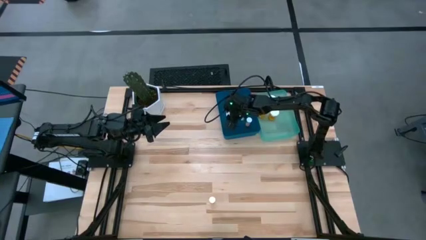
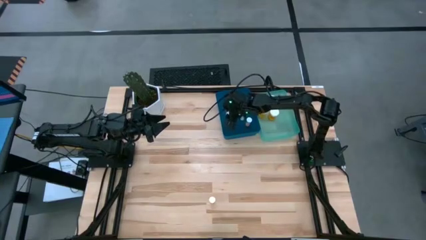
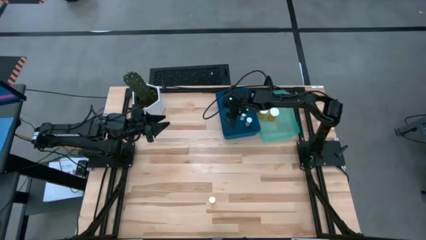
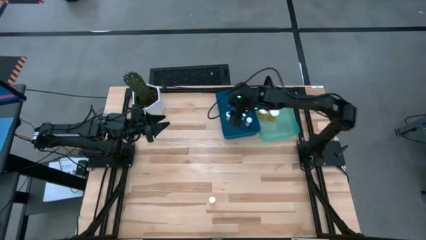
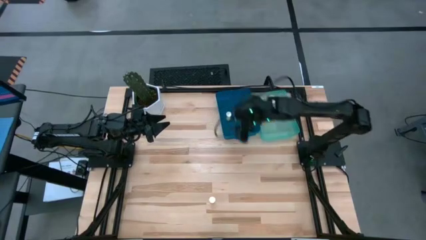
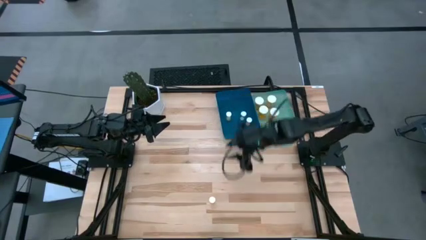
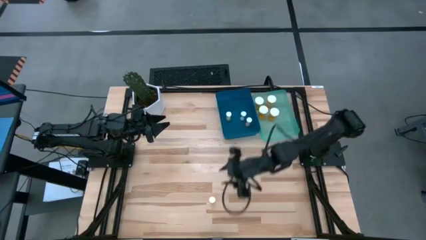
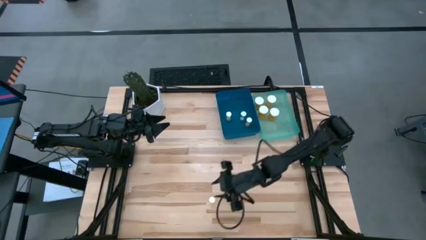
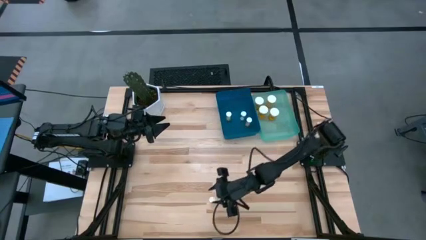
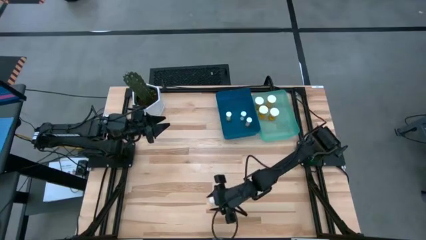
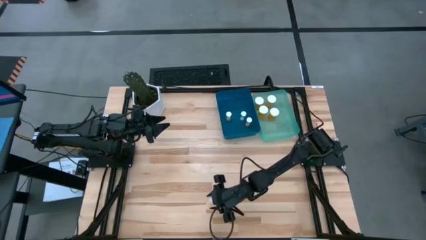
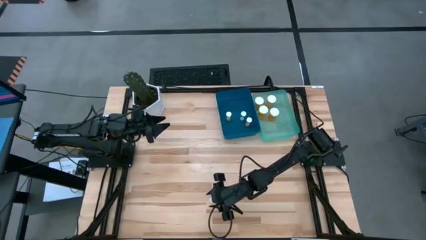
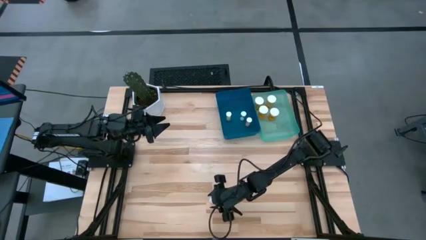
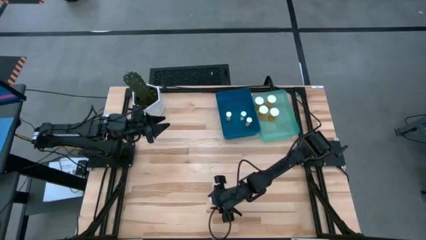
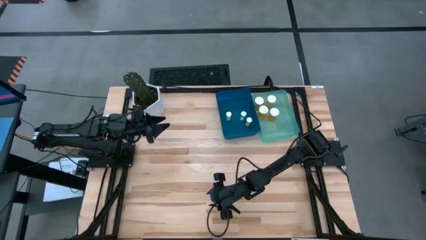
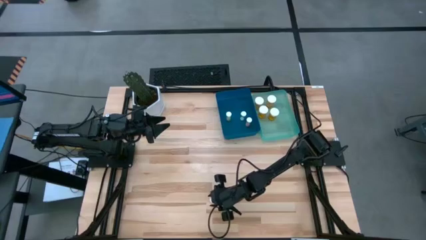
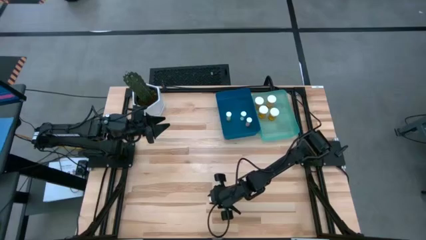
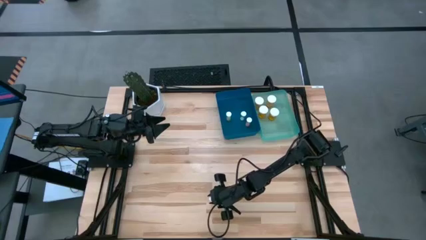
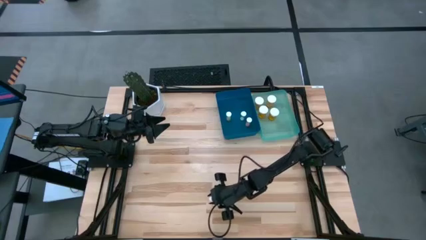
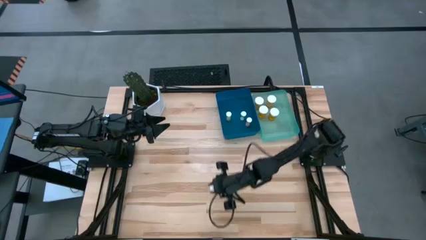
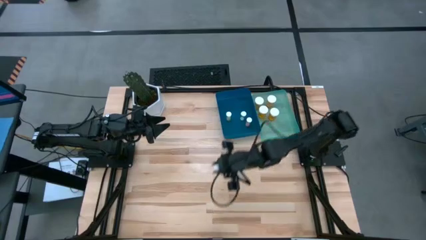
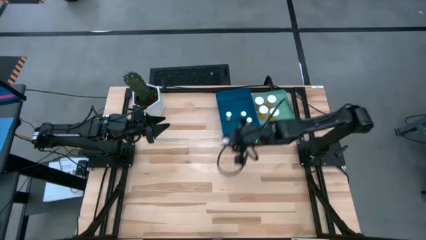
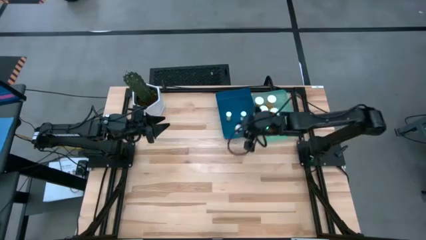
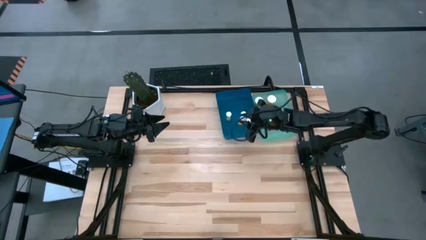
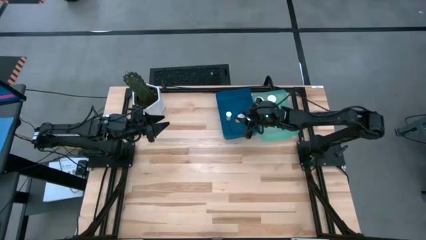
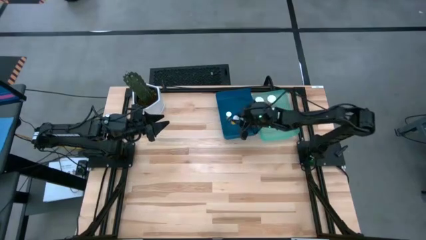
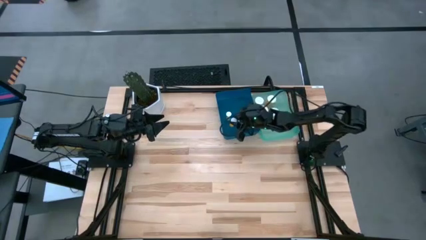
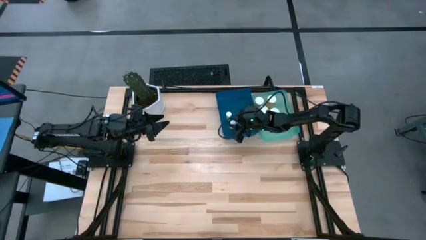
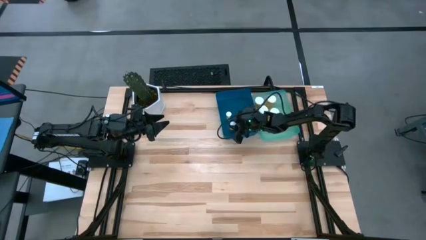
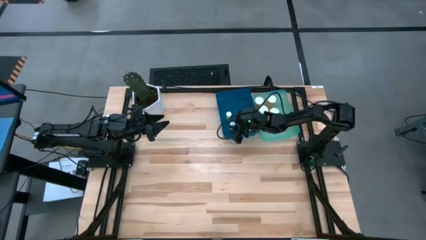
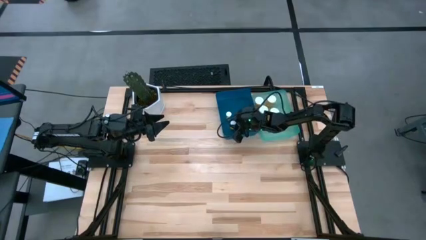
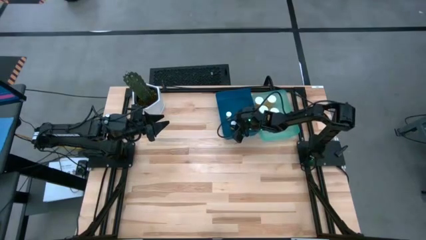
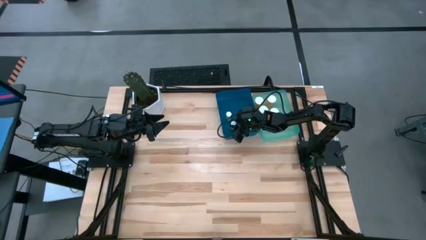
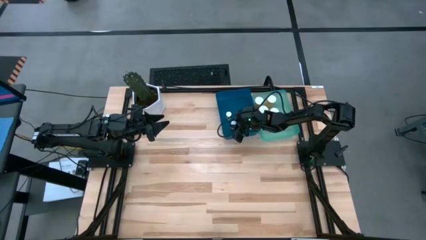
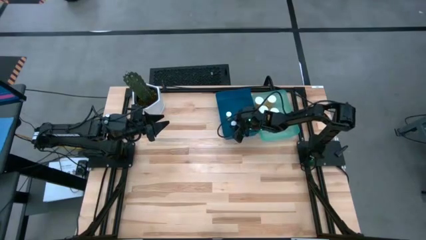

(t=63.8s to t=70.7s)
Task: Pick and place medicine bottles into bin by pill shape (circle, oval)
Put the orange tablet bottle into the dark blue bin

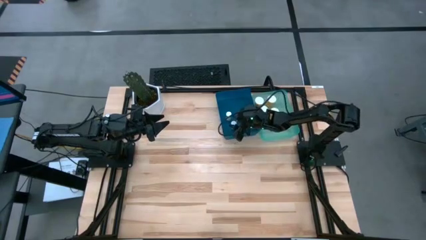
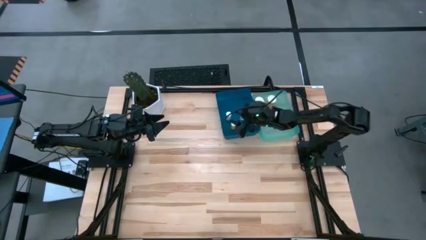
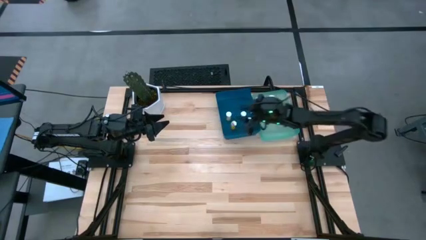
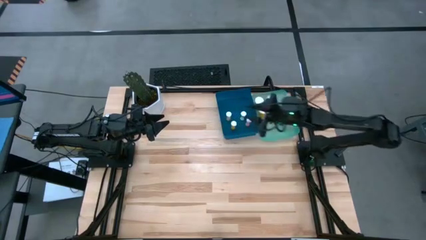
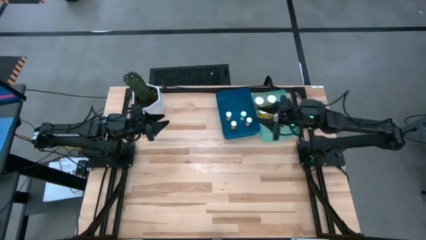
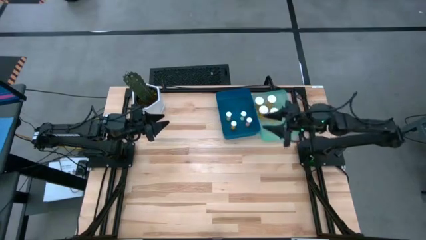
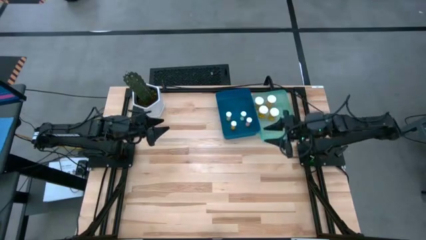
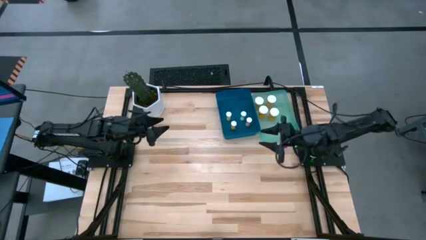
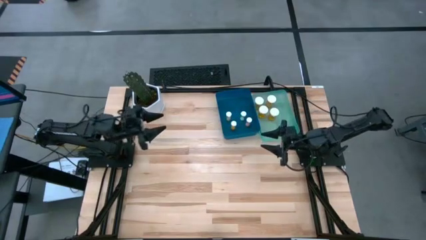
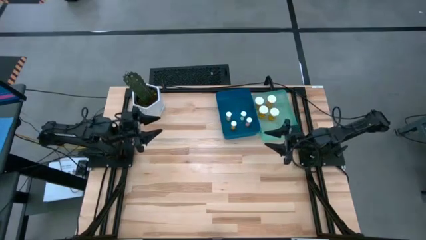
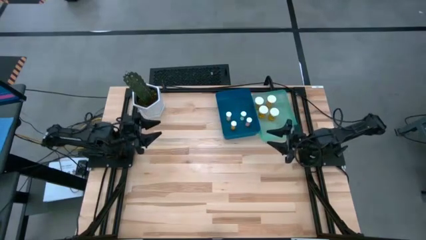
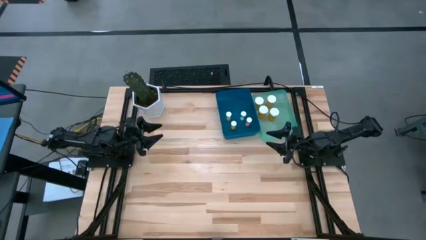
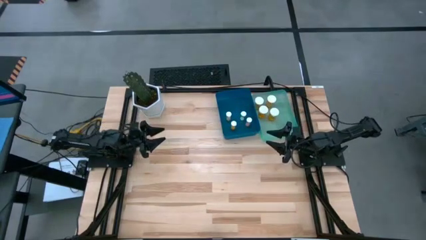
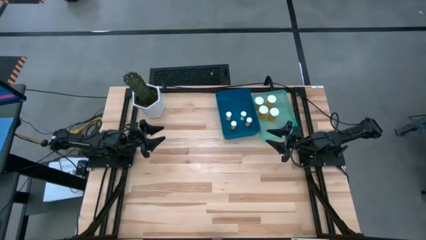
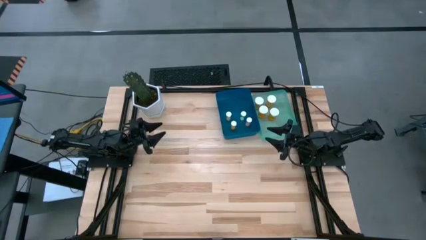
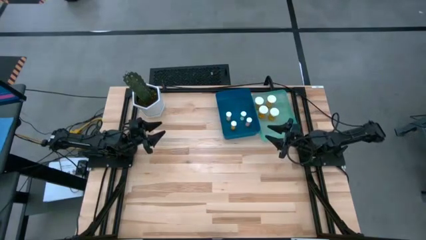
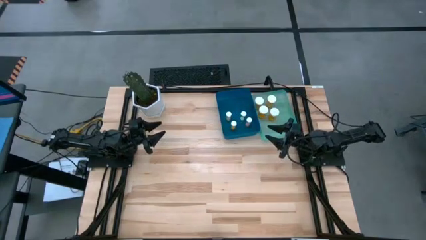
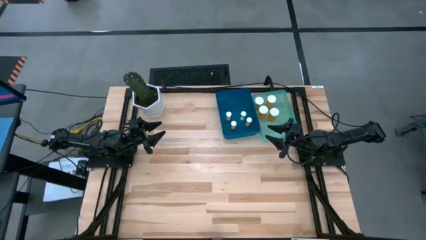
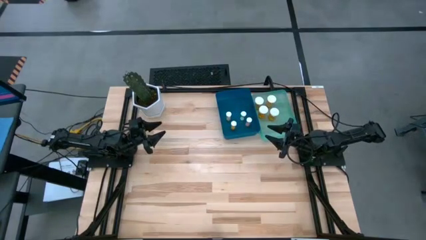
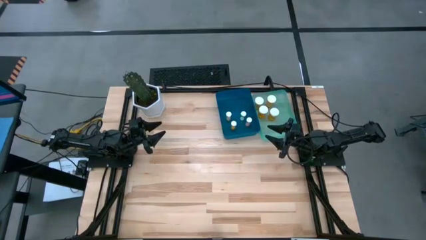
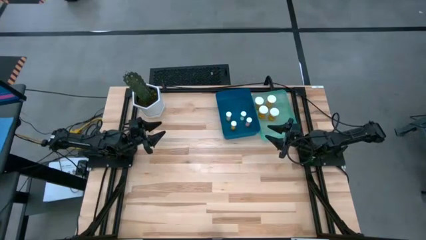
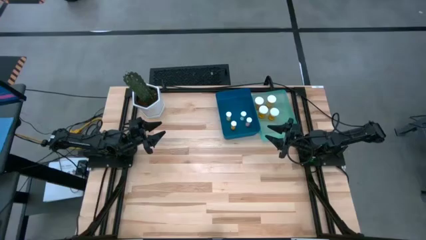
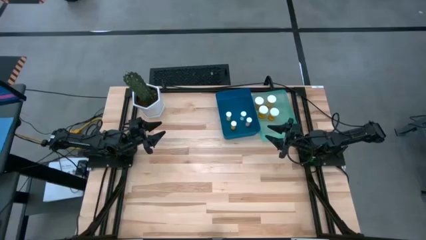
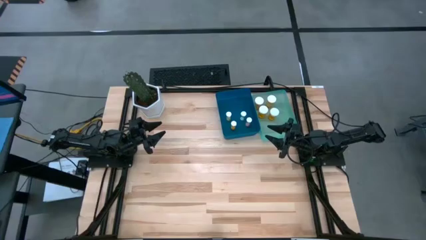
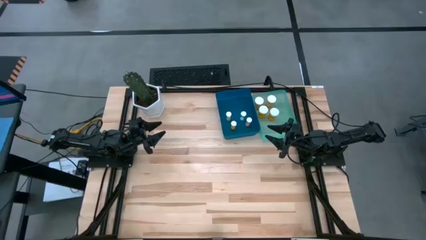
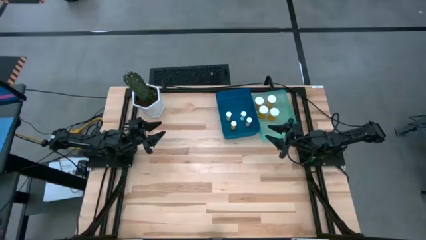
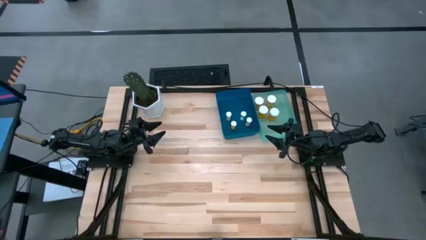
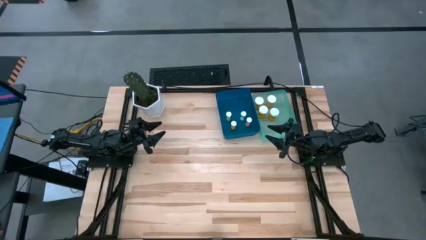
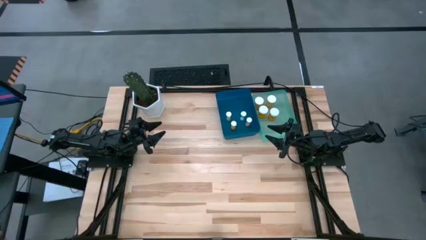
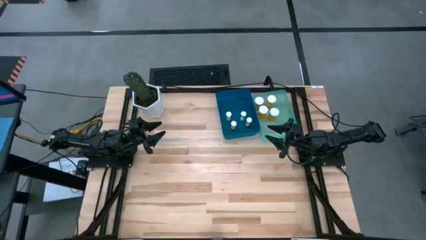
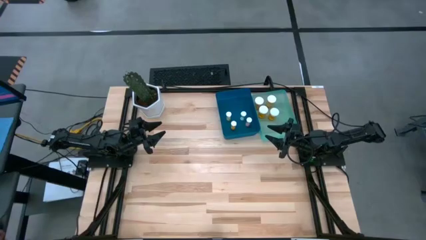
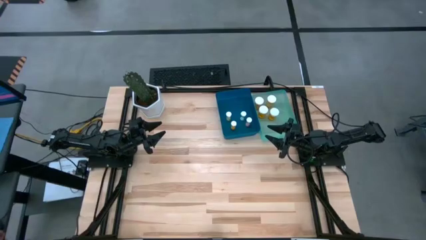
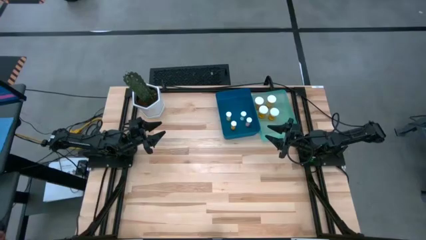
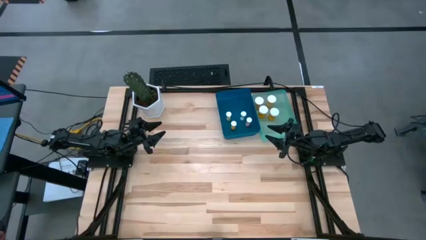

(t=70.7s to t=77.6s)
Return to Home Position

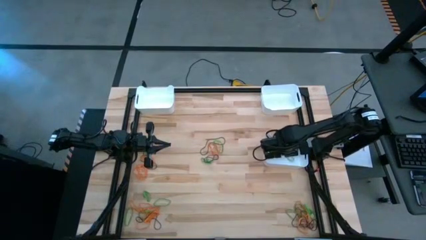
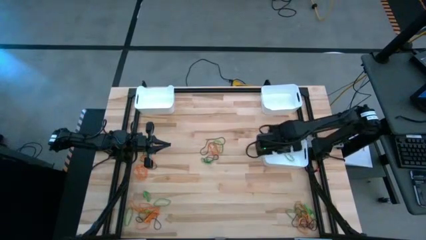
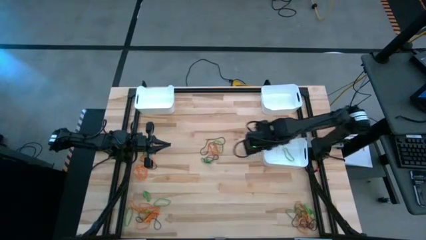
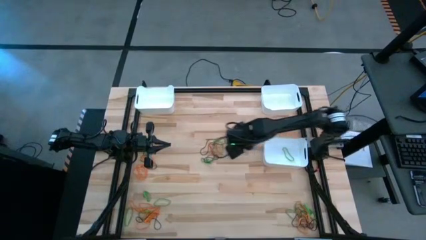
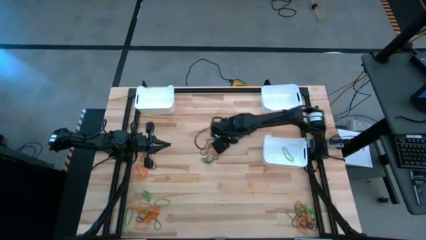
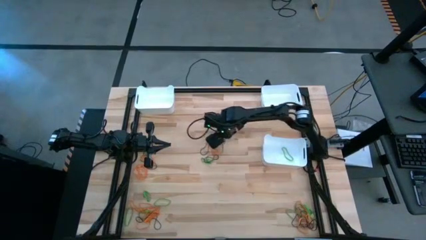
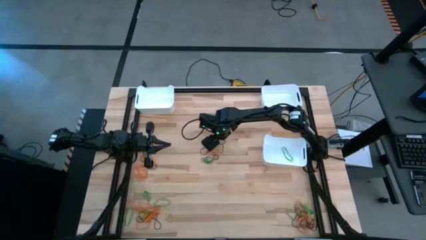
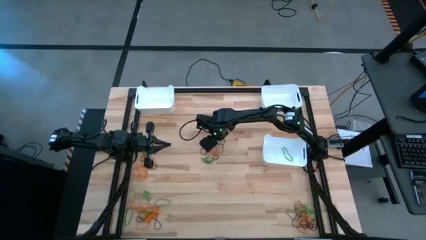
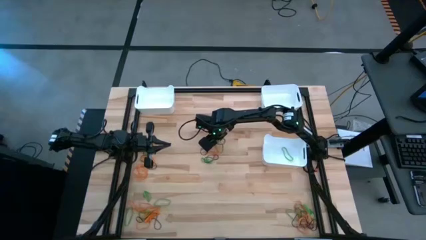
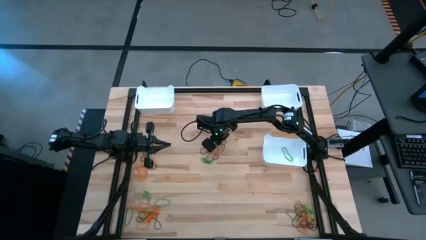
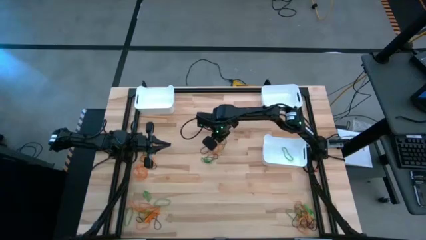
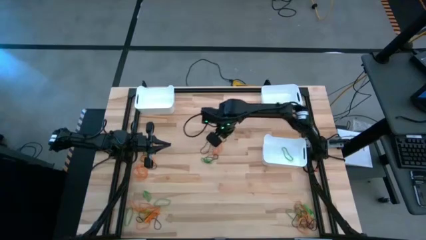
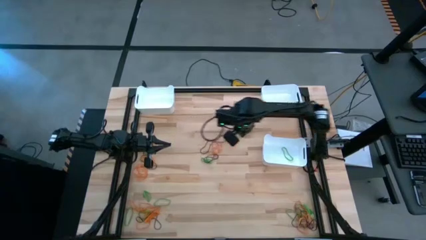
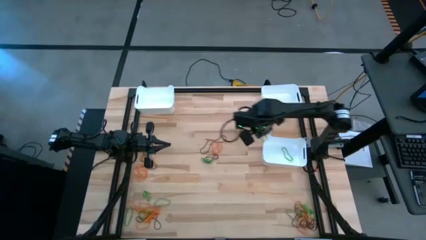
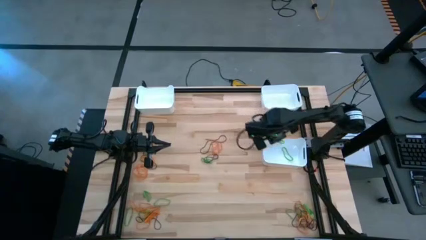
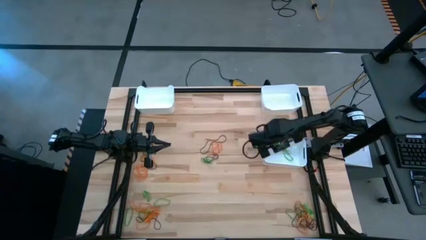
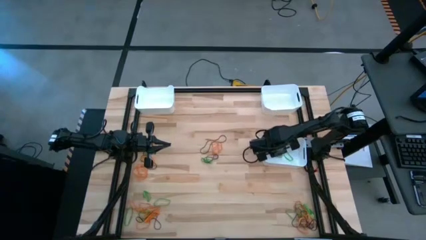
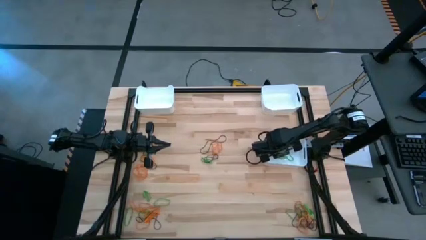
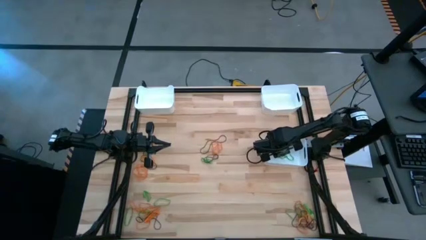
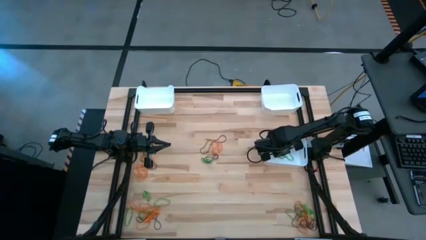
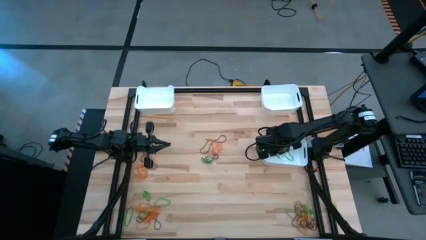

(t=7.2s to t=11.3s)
Task: Sort rubber bands into baskets
Put the green rubber band into the bottom white bin
